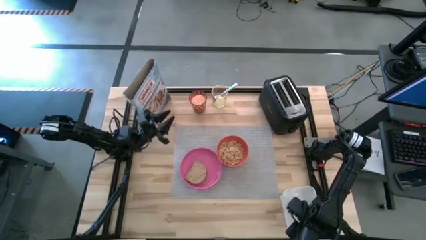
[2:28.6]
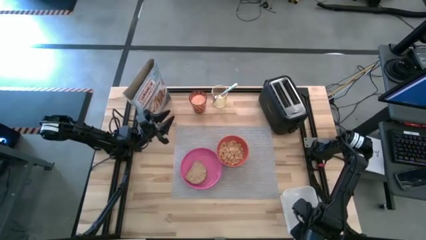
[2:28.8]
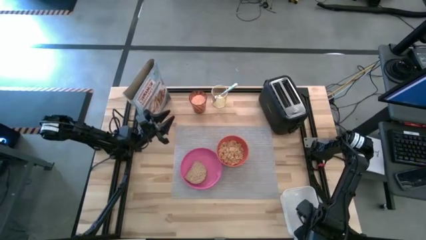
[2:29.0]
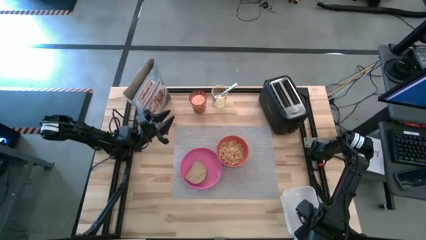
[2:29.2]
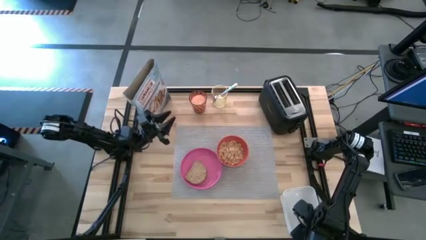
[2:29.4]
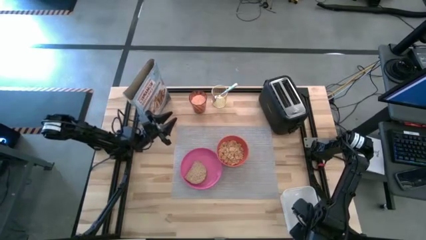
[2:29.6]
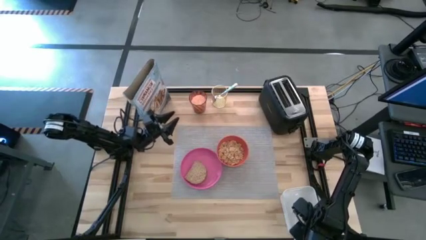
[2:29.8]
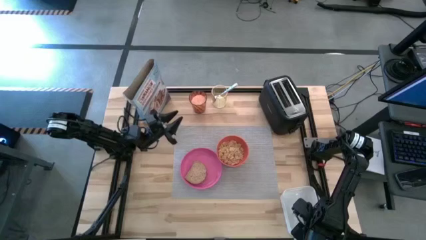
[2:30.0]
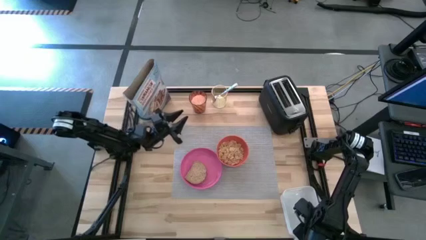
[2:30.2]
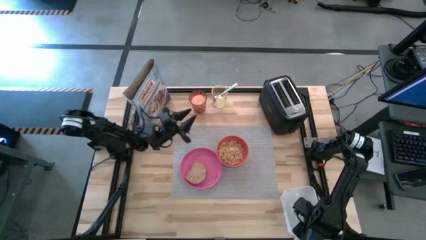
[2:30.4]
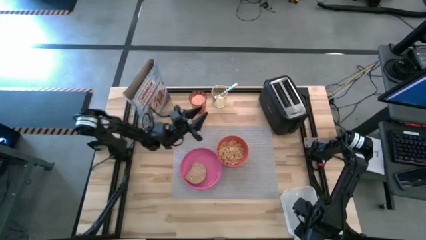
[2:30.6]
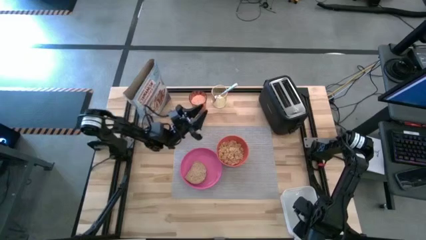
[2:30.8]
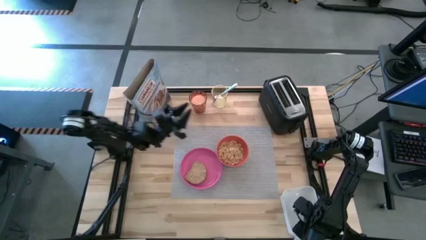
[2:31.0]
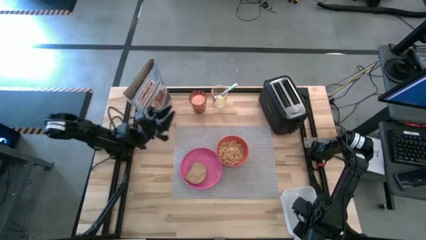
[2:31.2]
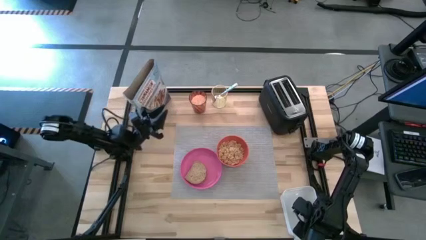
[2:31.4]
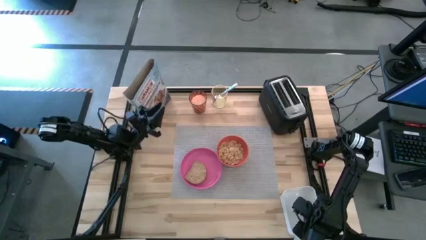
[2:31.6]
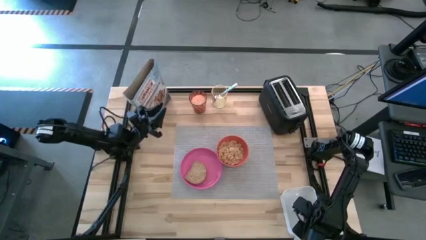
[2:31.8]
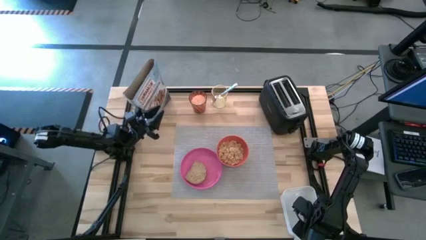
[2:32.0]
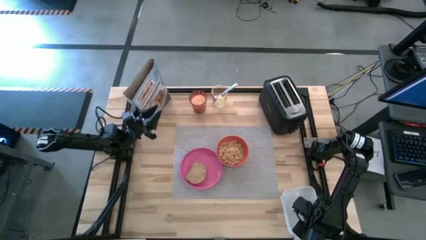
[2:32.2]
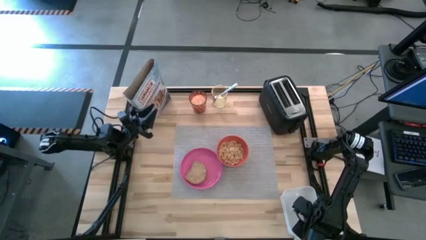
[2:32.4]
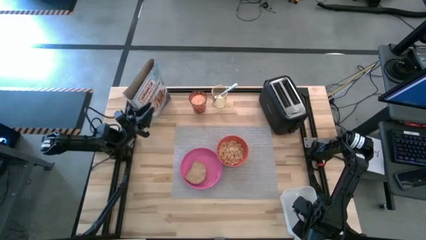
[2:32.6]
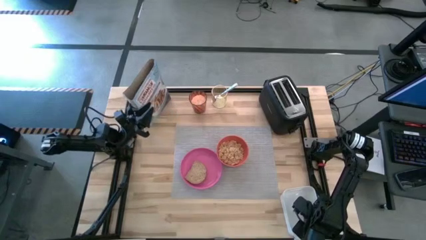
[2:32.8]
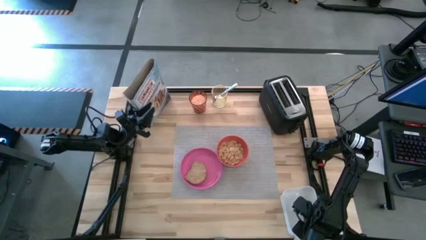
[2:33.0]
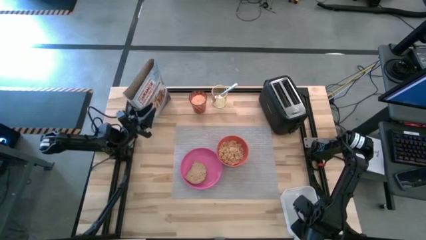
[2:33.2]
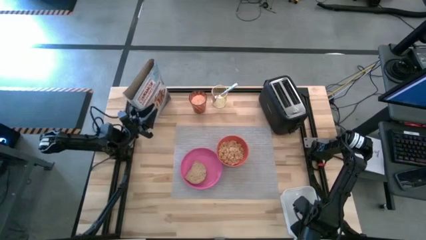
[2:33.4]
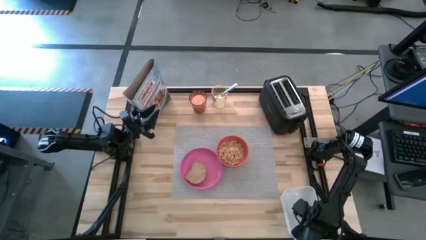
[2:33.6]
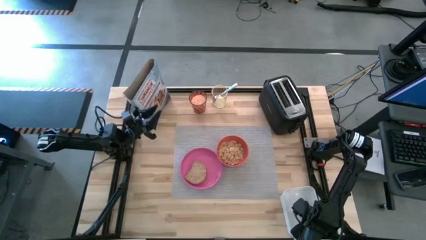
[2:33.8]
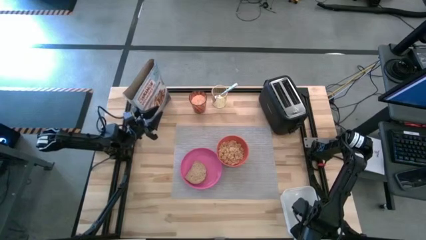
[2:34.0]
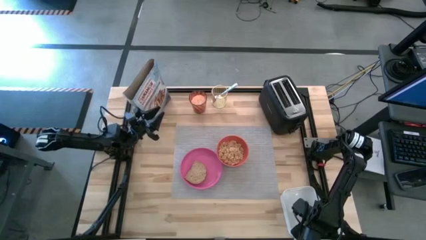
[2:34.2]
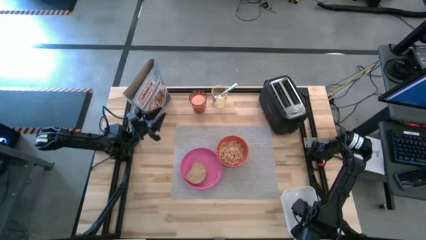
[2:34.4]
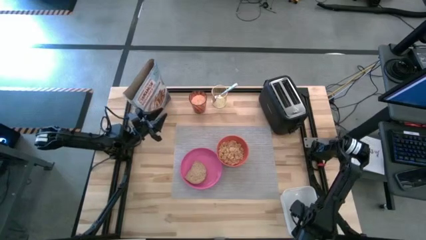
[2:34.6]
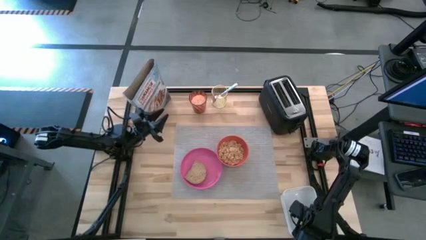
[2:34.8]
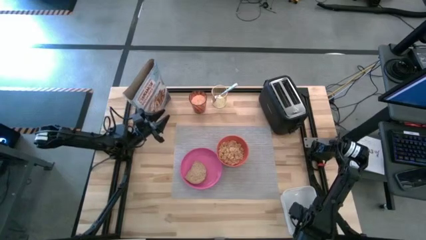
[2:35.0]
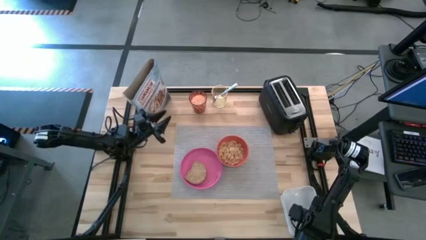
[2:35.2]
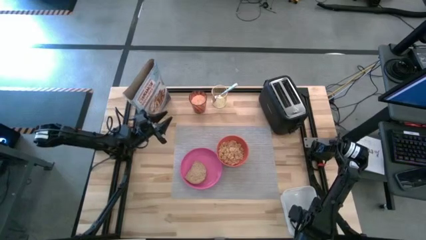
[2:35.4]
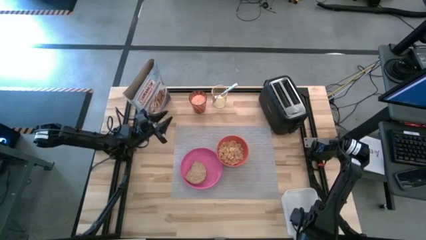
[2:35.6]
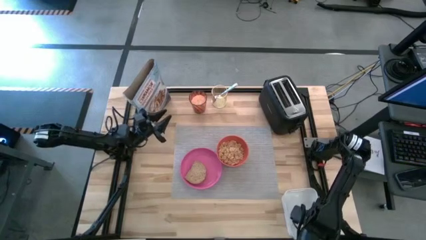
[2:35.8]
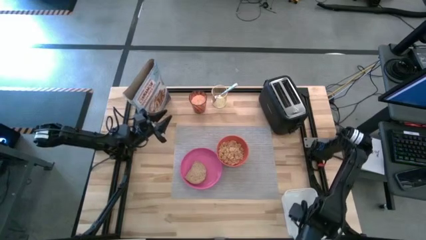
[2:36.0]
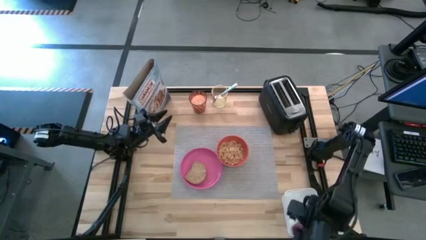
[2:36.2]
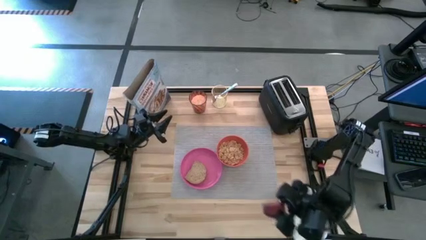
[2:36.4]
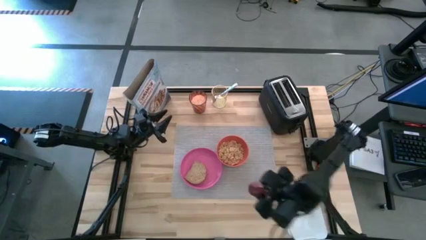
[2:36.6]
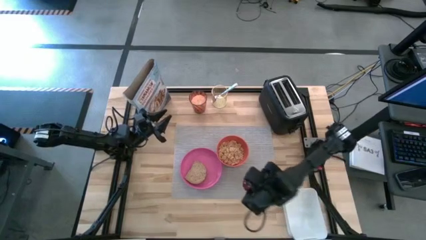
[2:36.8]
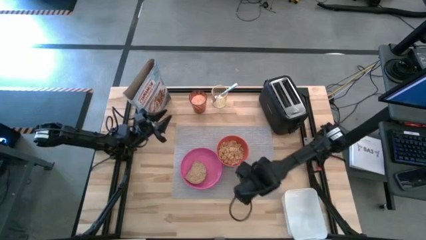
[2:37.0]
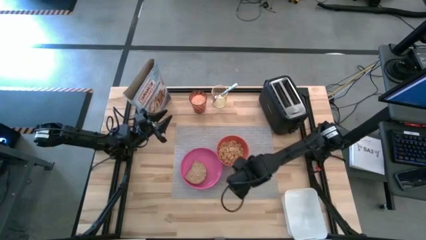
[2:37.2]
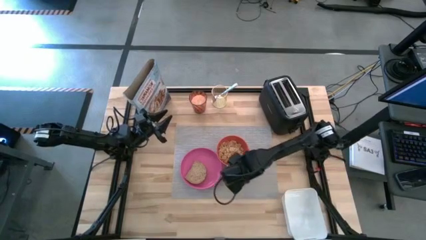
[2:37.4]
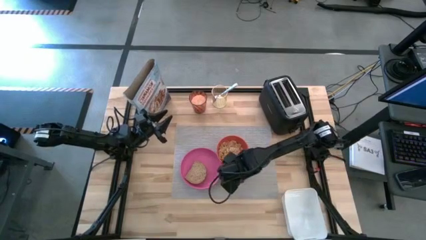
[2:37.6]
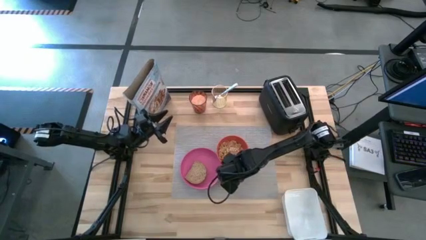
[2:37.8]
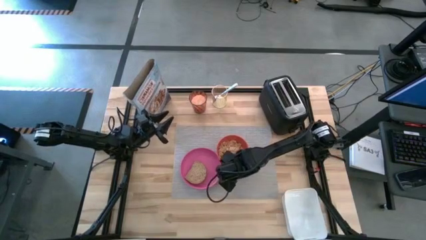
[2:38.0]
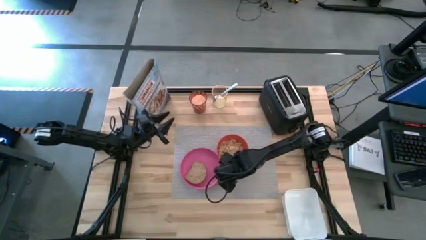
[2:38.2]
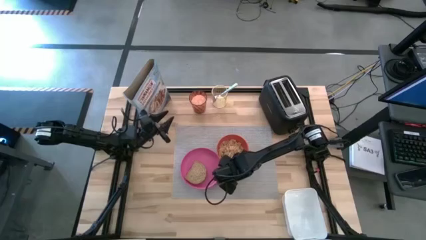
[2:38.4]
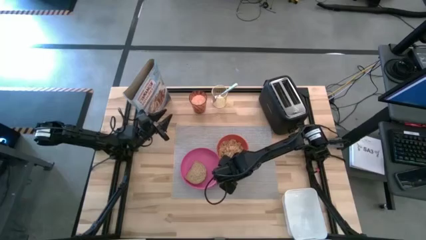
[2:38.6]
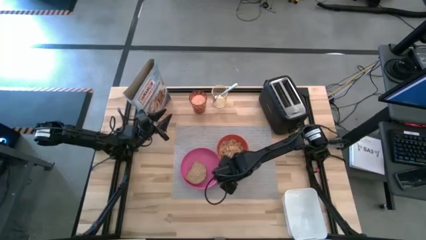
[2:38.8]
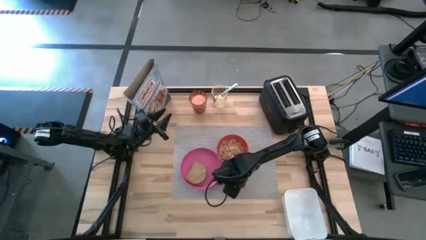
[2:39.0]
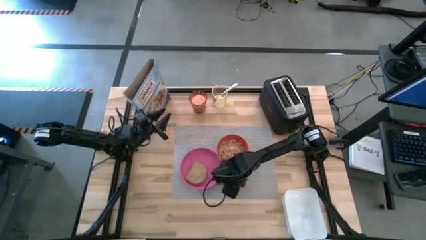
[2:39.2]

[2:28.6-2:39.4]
Task: Arrange a breakfast setting
Put the apple on the gray table mat to the bottom of the orange bowl

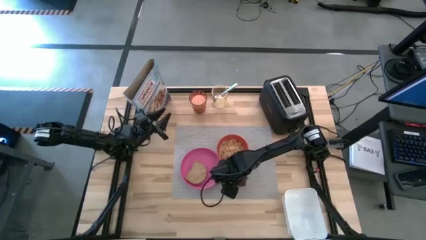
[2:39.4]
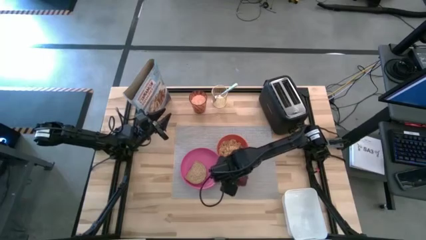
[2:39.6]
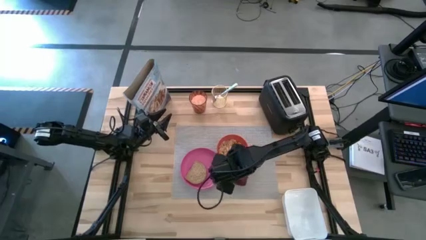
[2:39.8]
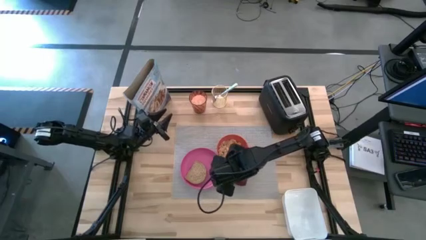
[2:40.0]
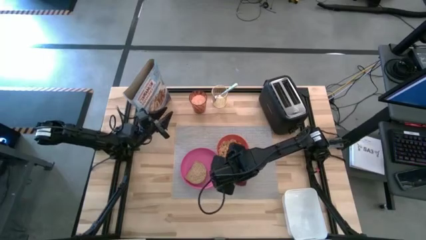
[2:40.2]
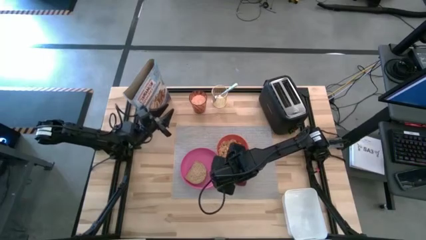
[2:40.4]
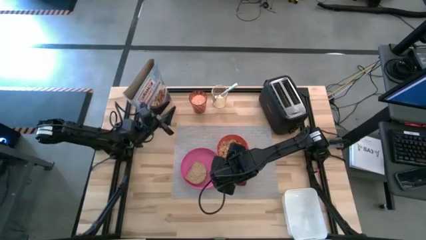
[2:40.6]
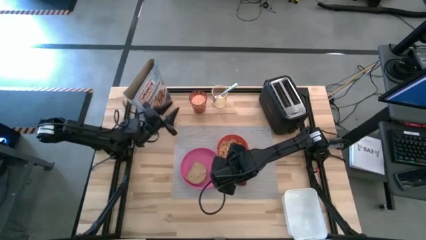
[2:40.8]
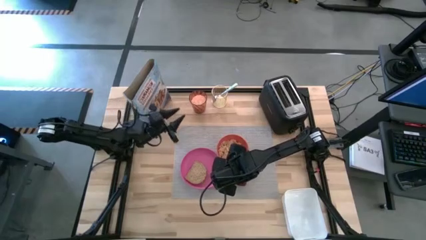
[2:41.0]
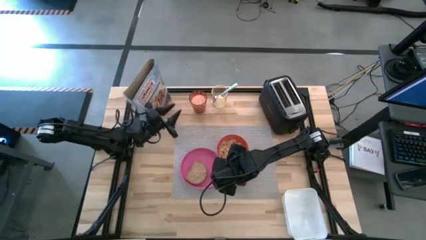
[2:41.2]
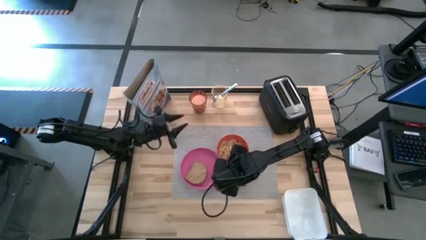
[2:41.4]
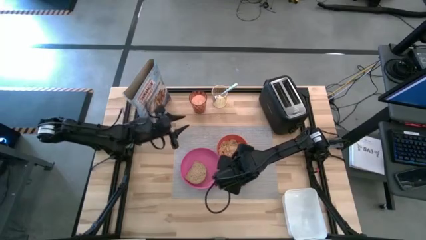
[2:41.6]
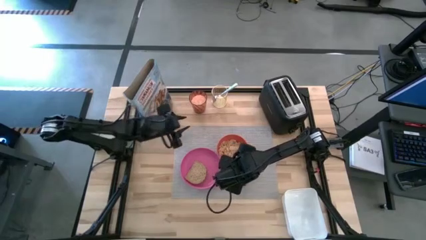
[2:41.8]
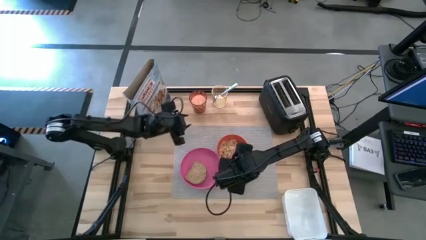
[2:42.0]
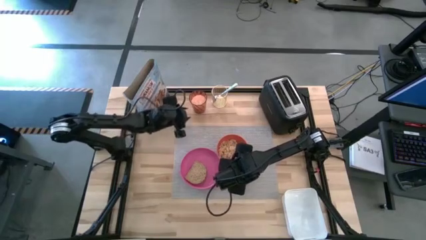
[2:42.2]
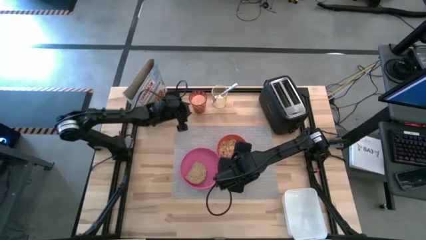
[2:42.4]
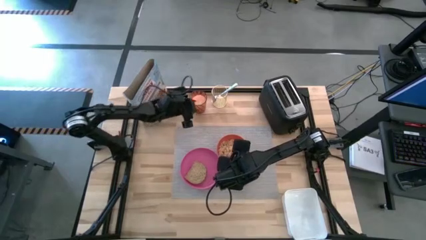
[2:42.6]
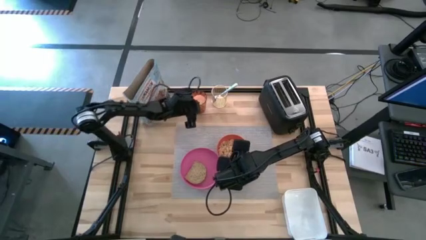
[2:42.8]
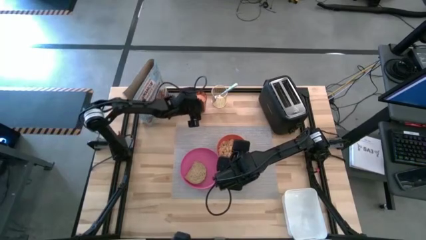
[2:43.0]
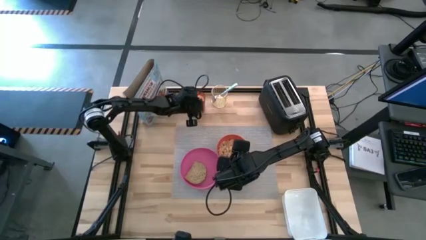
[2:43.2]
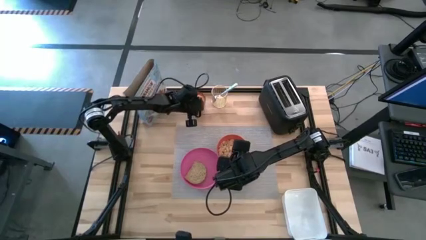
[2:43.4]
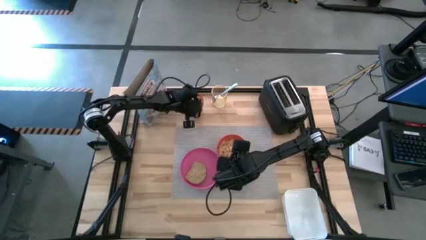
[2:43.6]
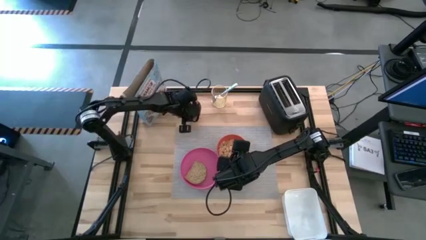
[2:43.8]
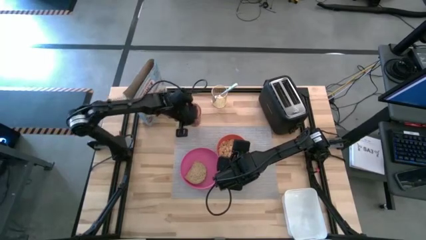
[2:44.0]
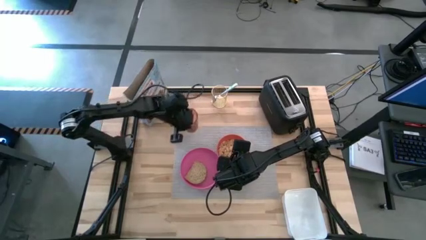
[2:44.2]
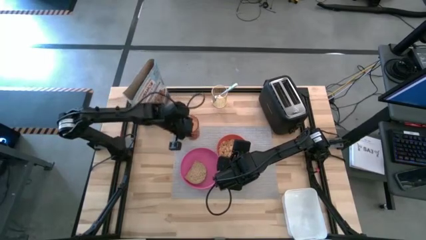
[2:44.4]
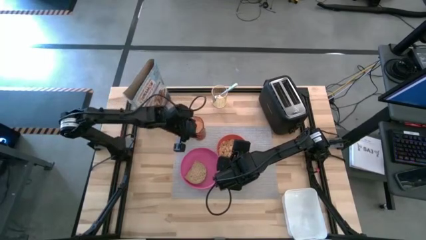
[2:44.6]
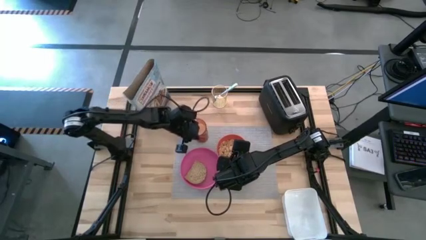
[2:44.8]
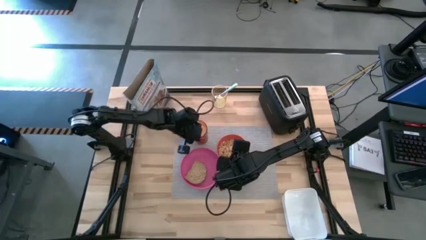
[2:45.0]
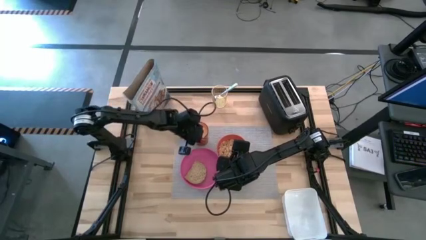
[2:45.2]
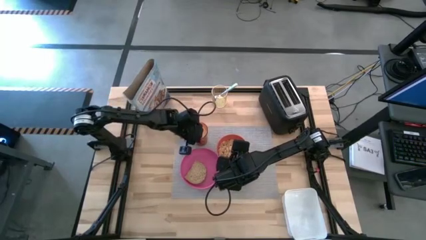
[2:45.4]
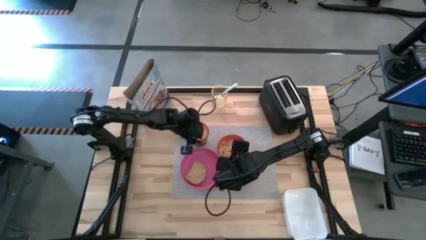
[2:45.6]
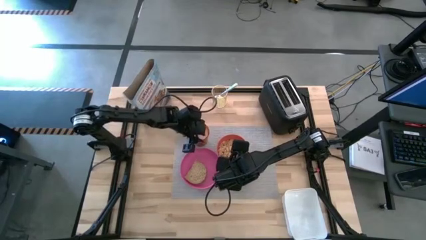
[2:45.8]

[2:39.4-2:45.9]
Put the brown cup on the gray table mat to the top of the pink plate
